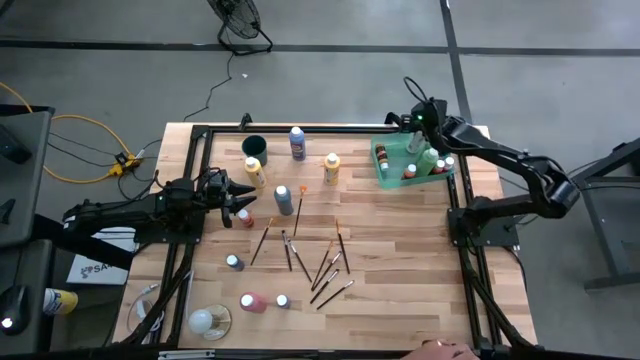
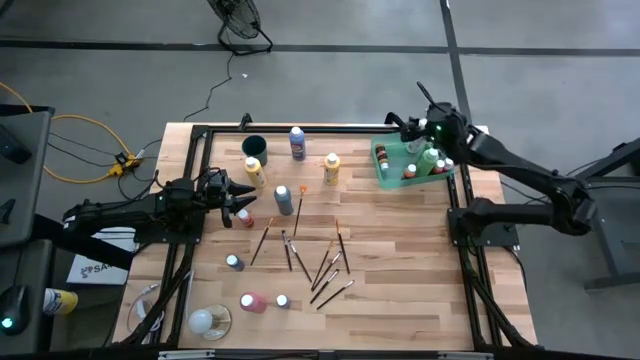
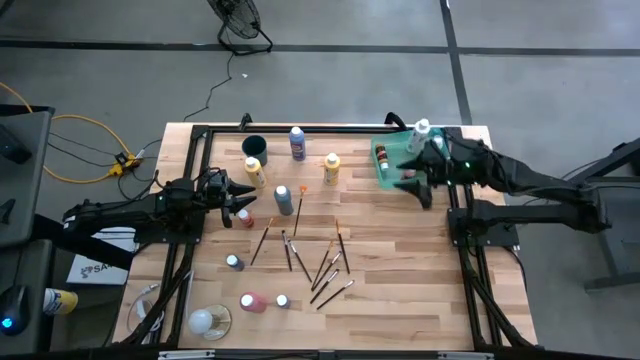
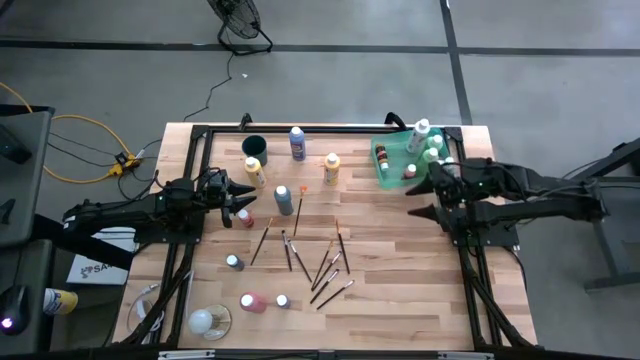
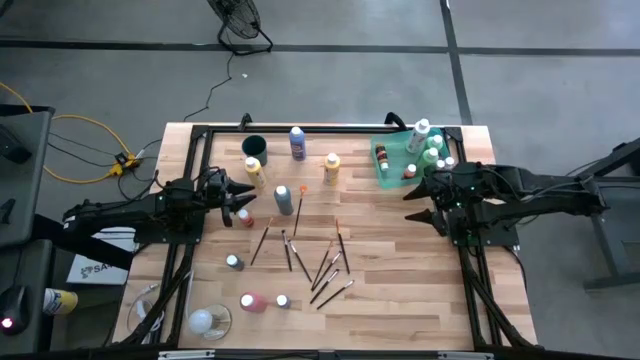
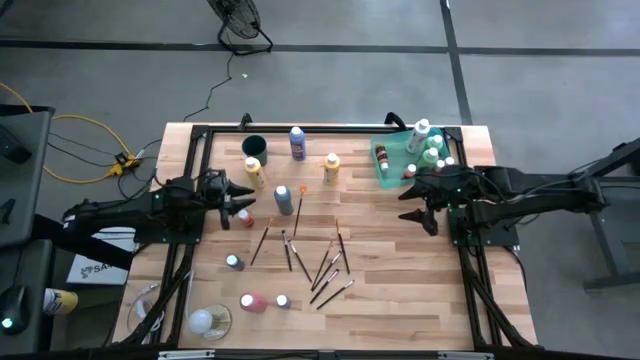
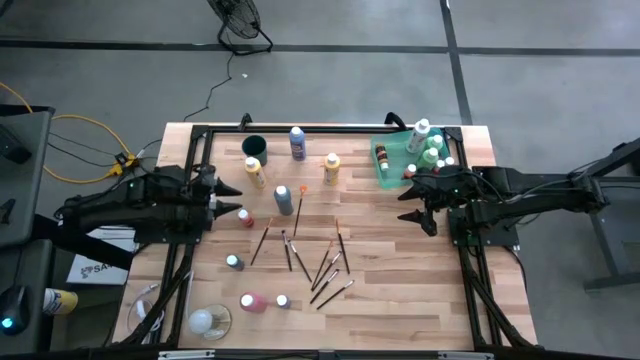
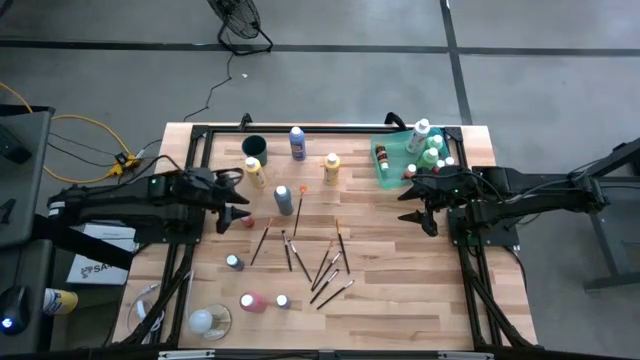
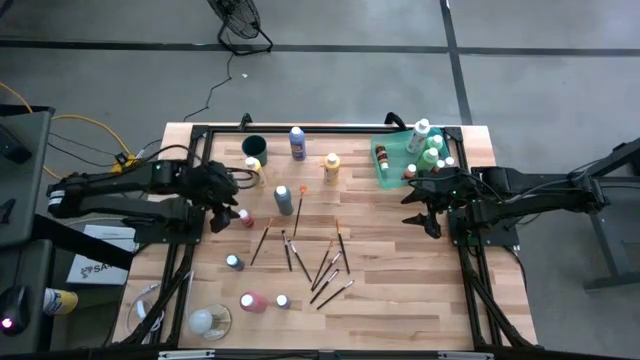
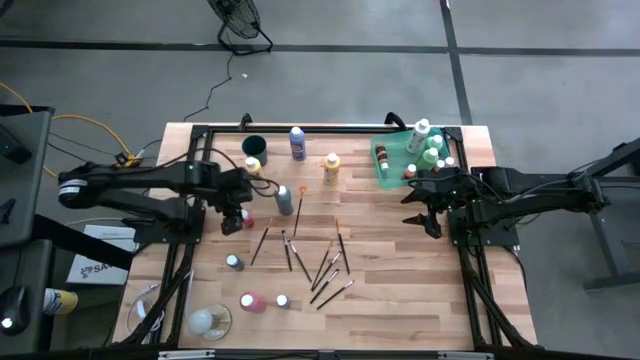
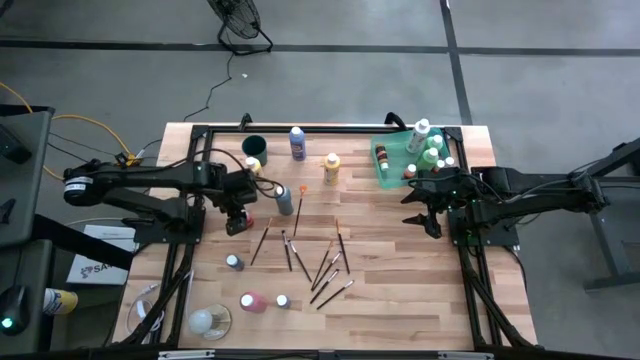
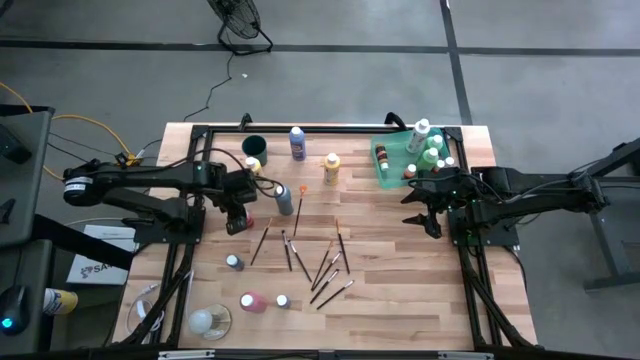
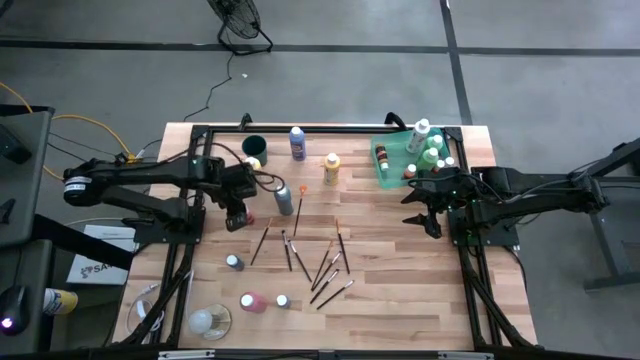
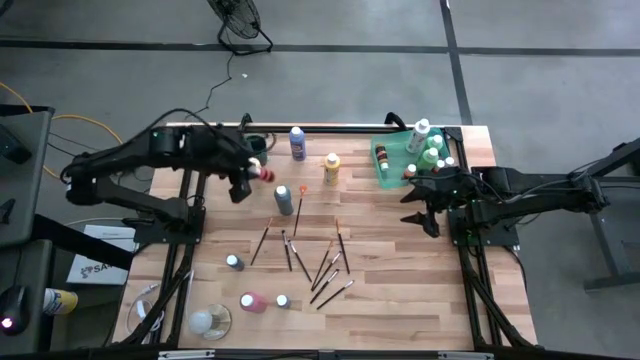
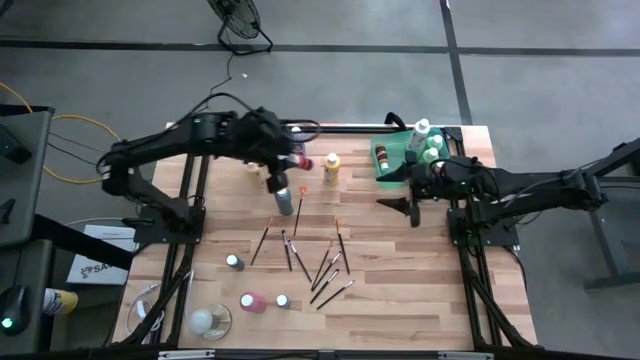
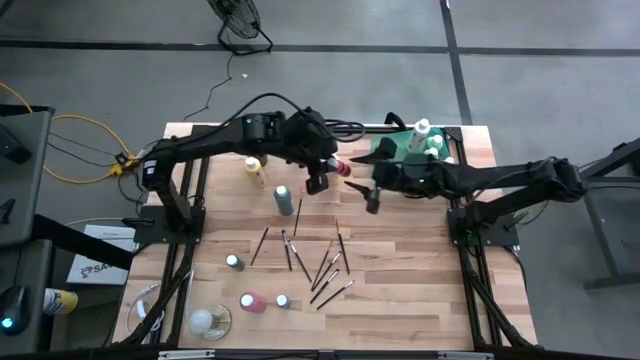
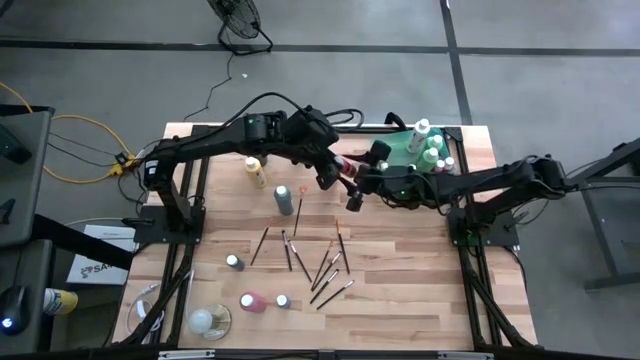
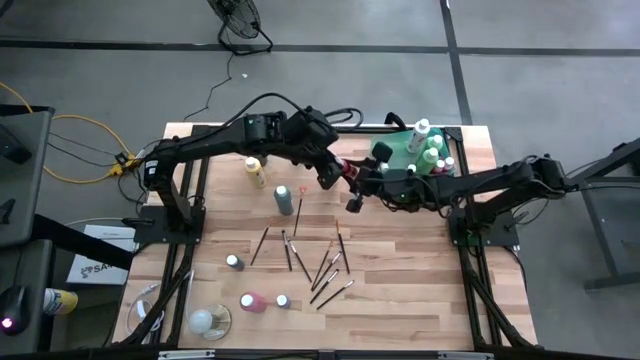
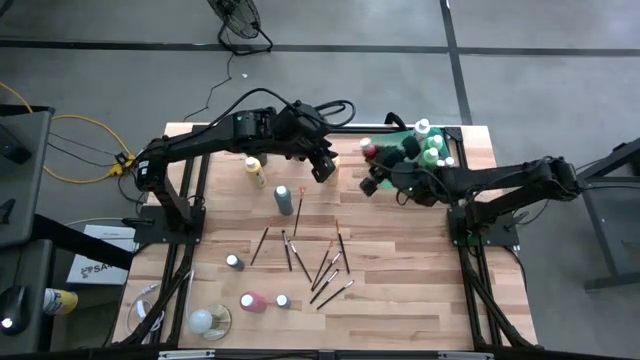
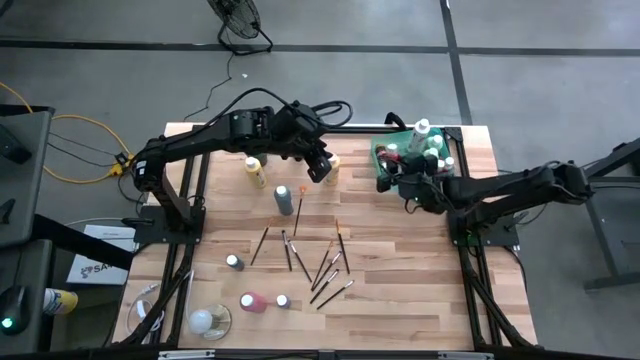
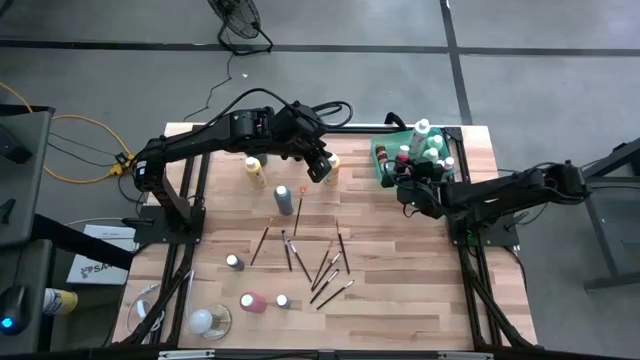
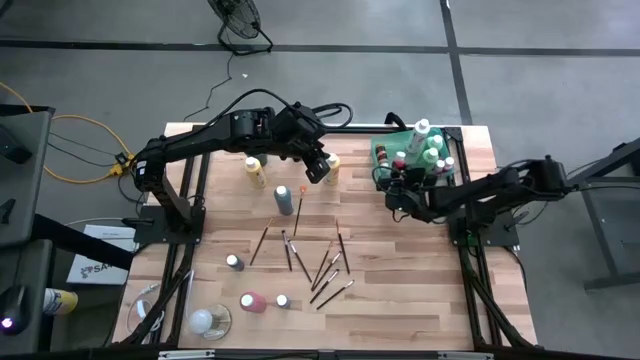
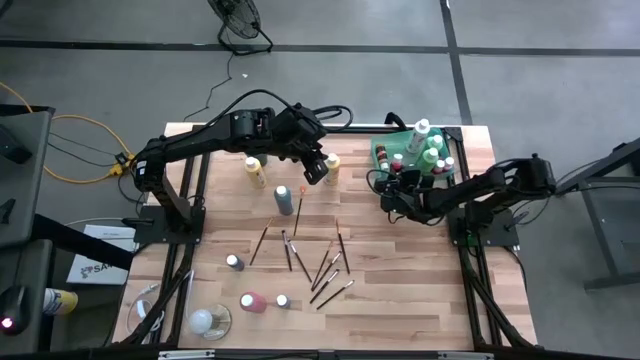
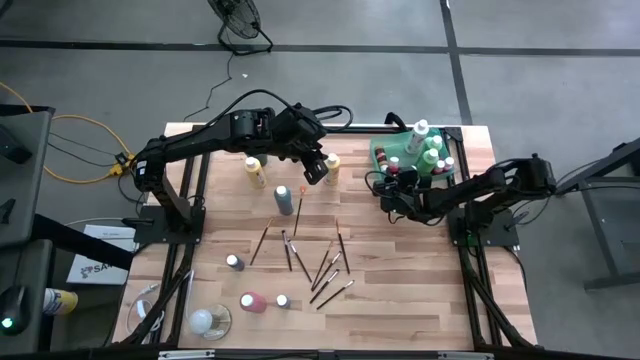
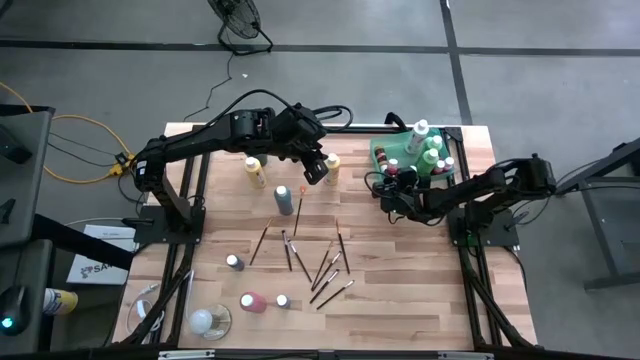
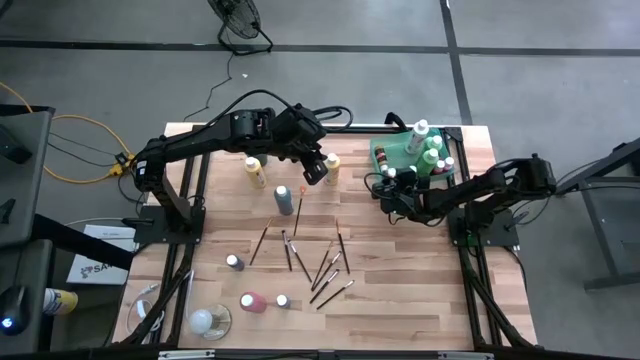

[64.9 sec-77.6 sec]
Task: Pick & Place Paint Supplies
Put the small orange paint bottle into the green bin

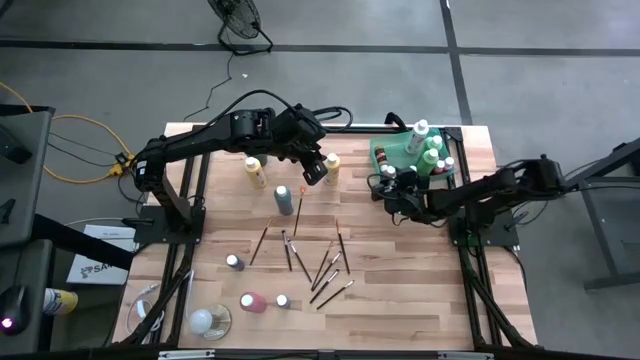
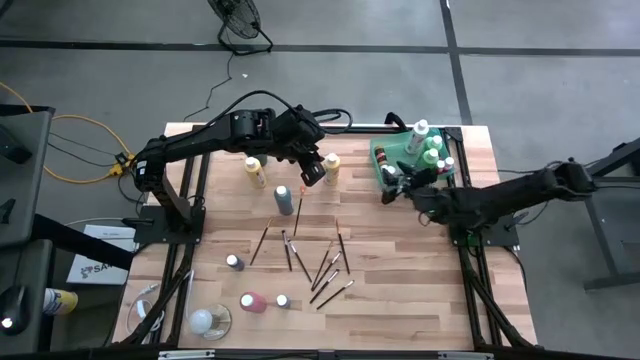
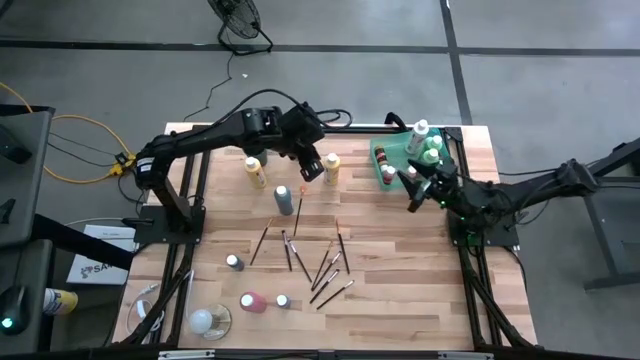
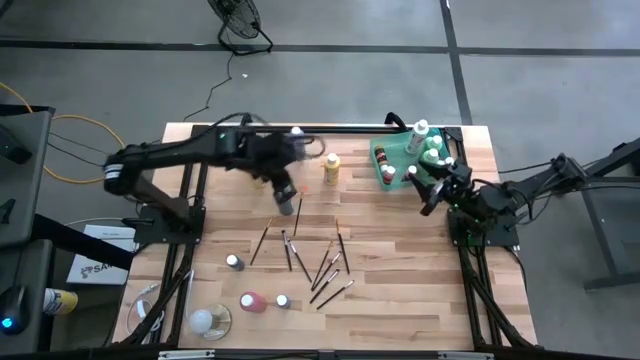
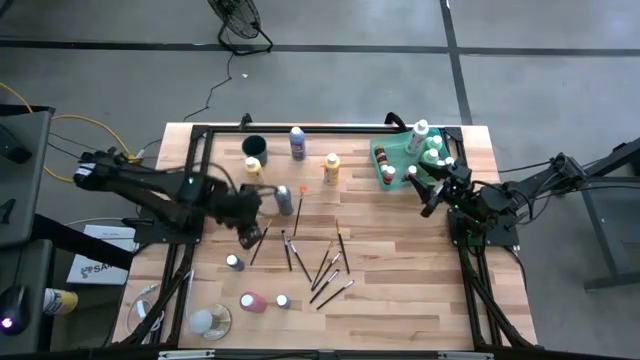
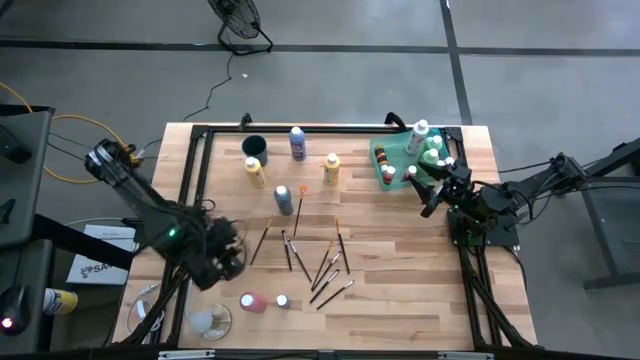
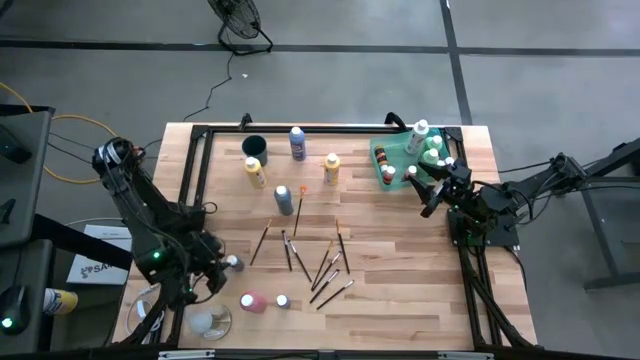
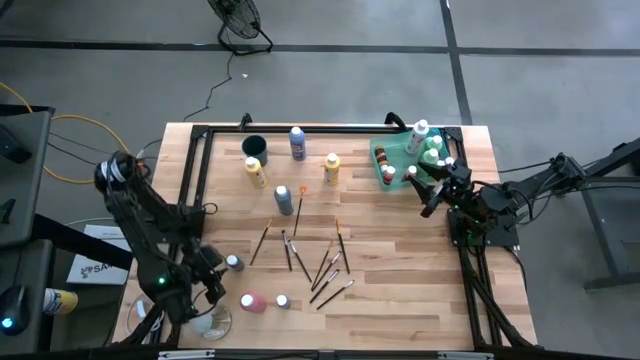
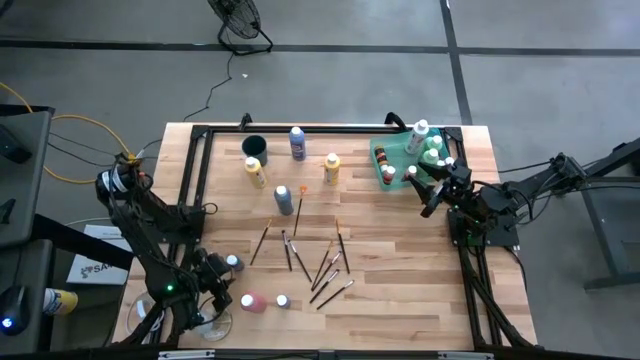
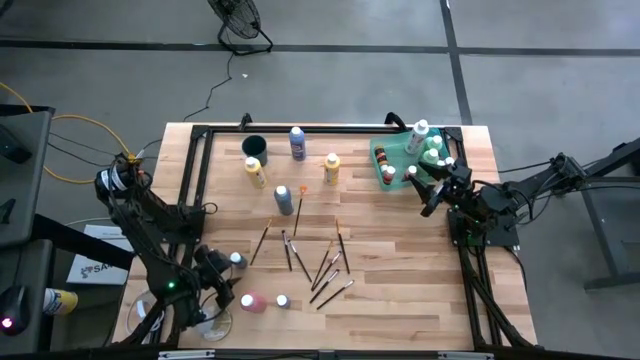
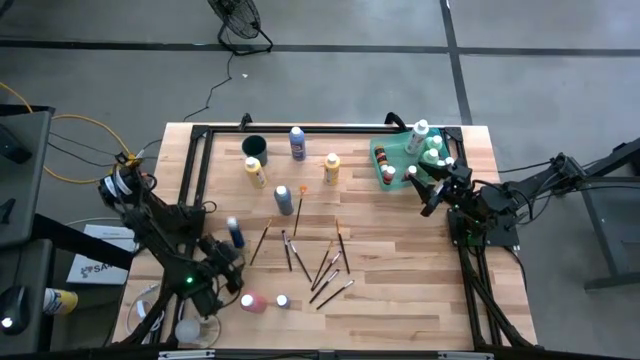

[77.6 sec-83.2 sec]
Put the small blue paint bottle into the green bin

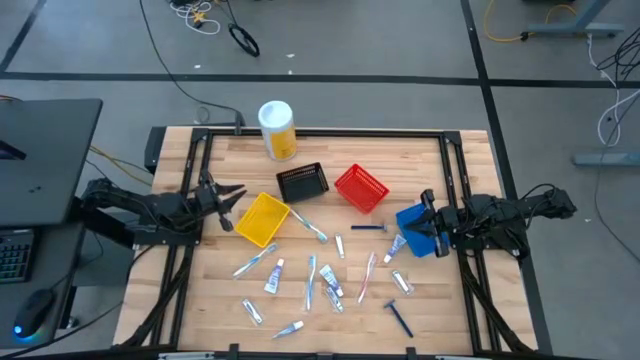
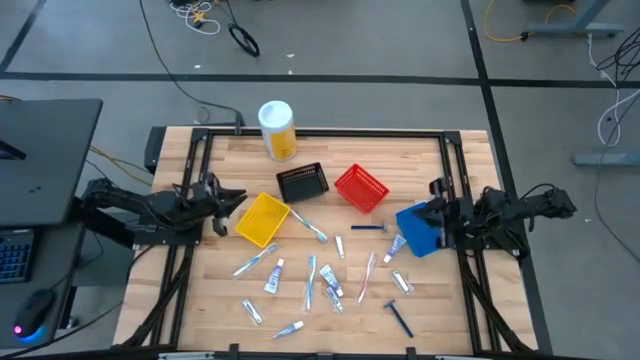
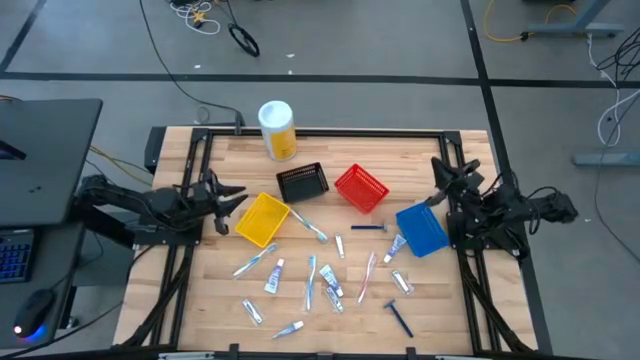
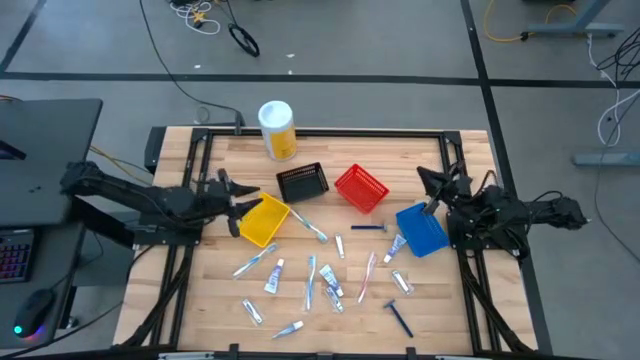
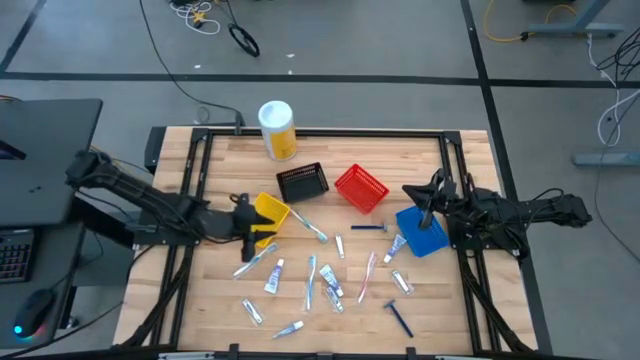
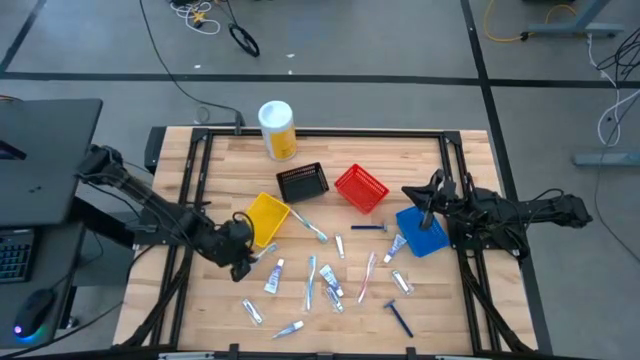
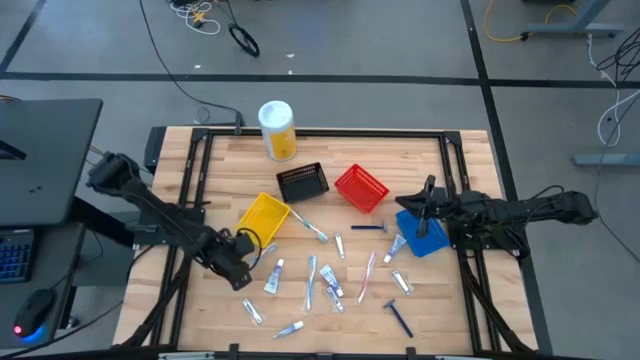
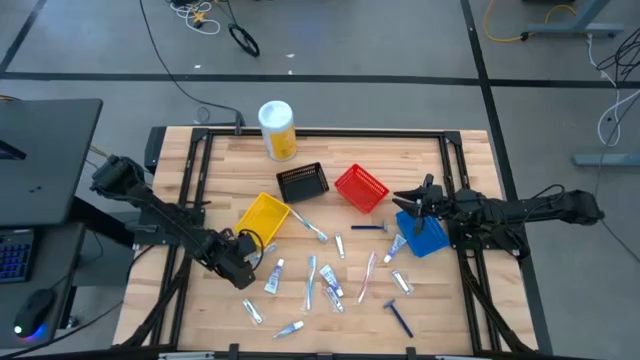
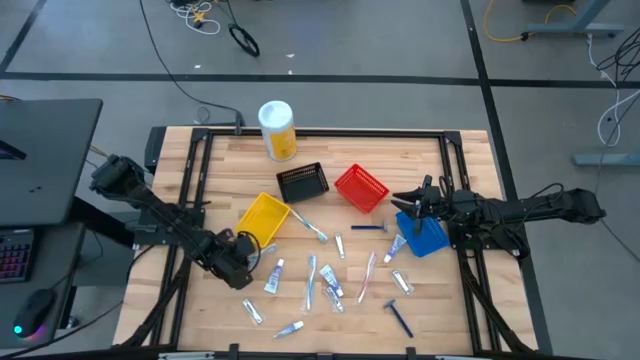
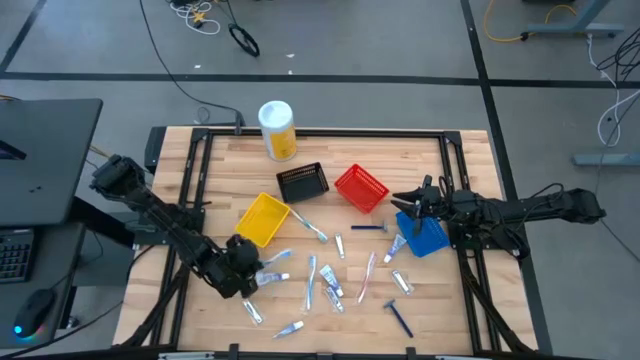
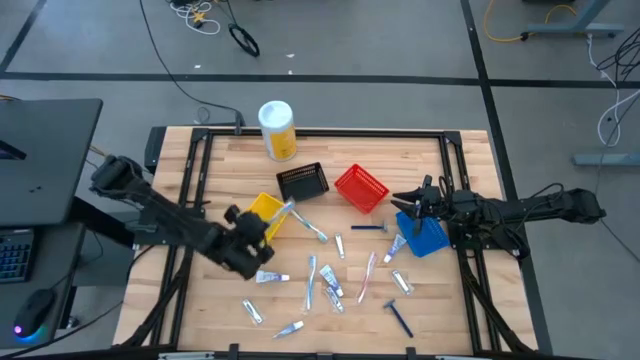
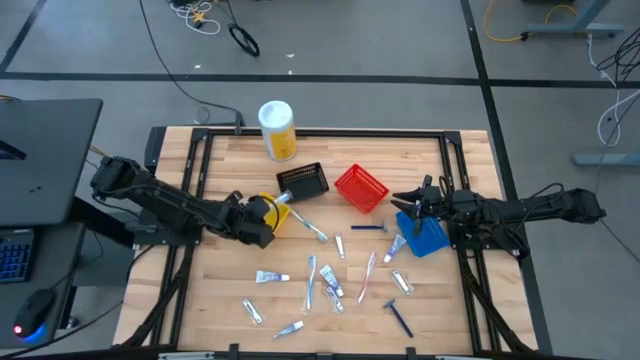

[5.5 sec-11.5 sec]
Task: Pick & Place Travel size toiletries
Put the blue toothbrush into the yellow basket
